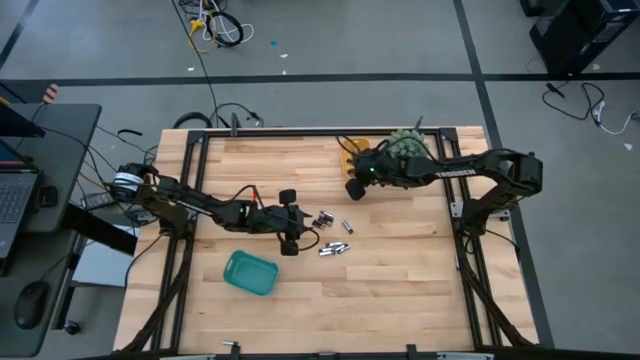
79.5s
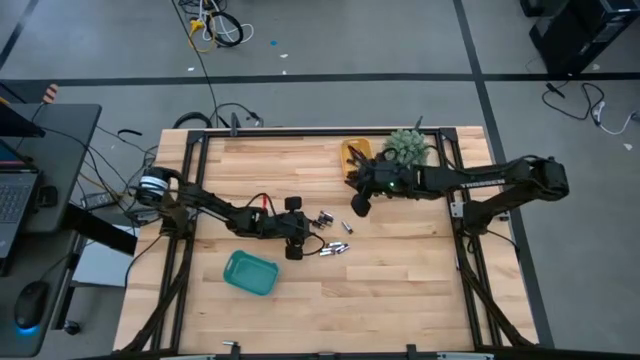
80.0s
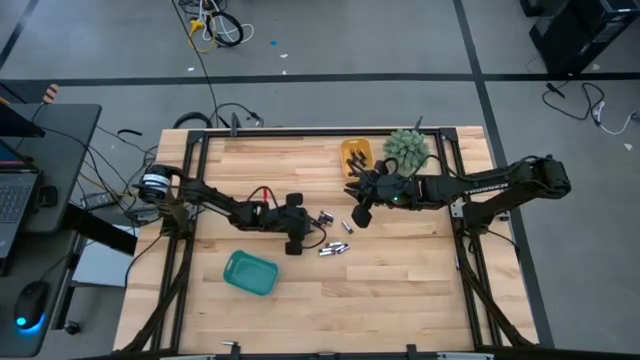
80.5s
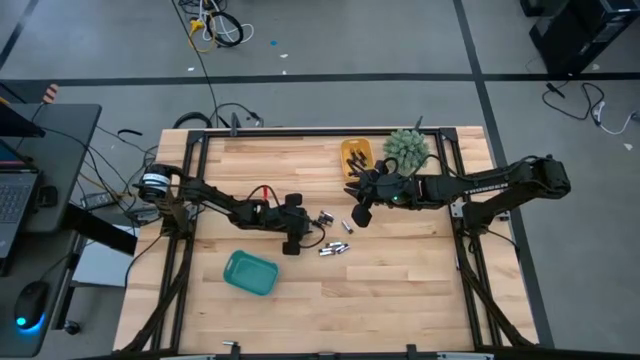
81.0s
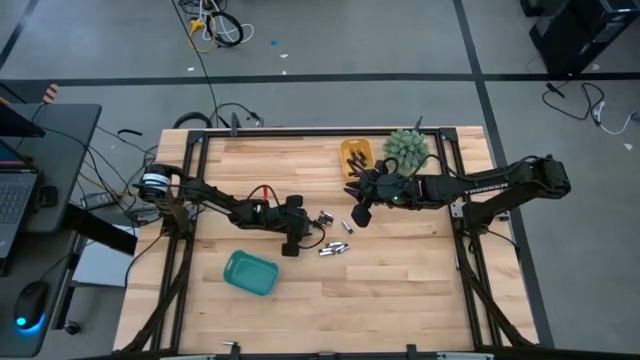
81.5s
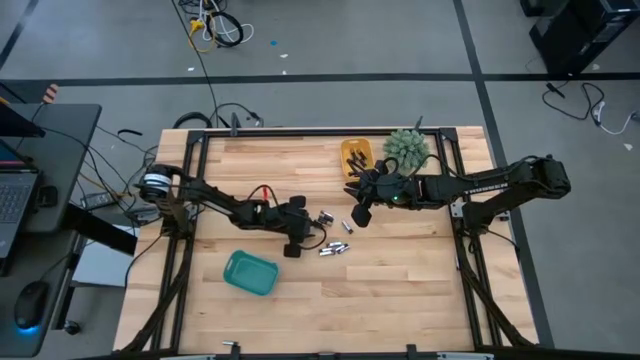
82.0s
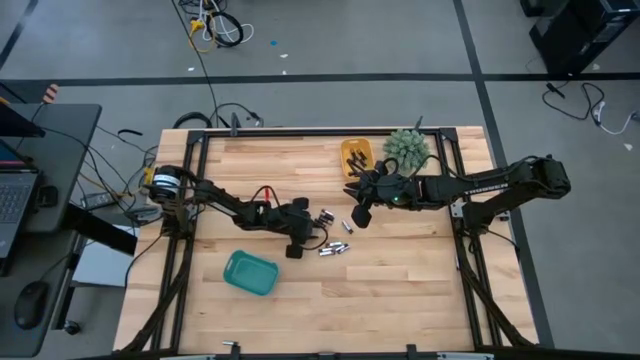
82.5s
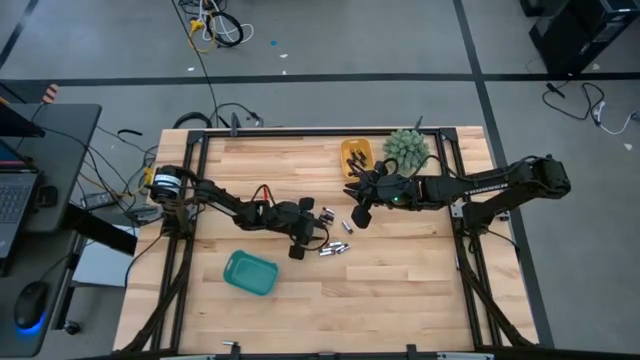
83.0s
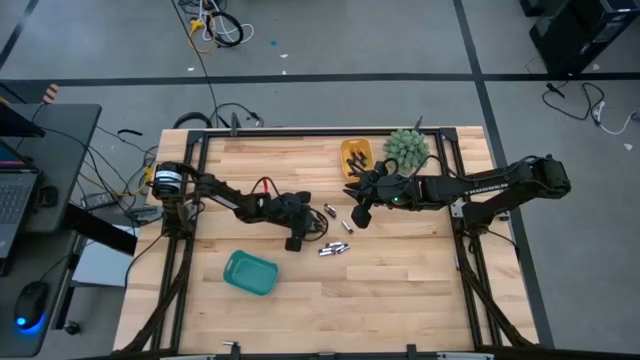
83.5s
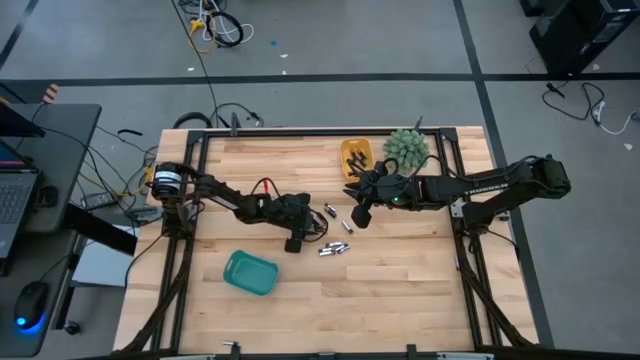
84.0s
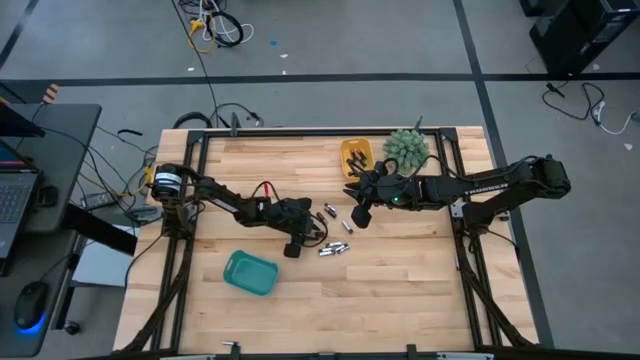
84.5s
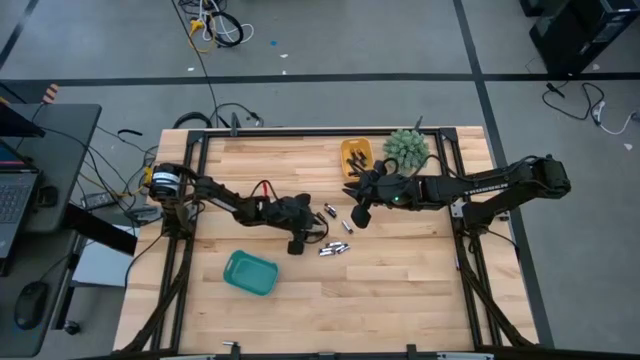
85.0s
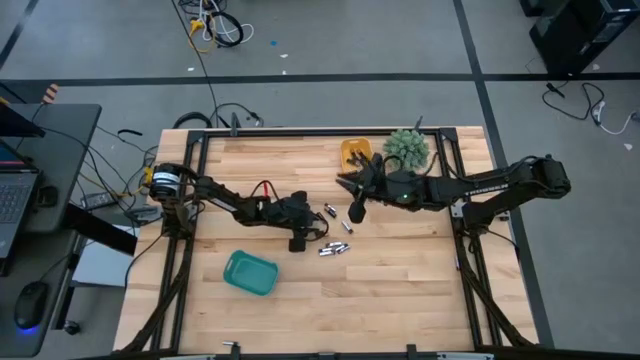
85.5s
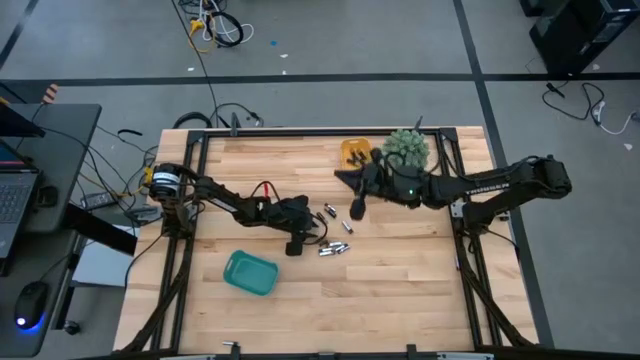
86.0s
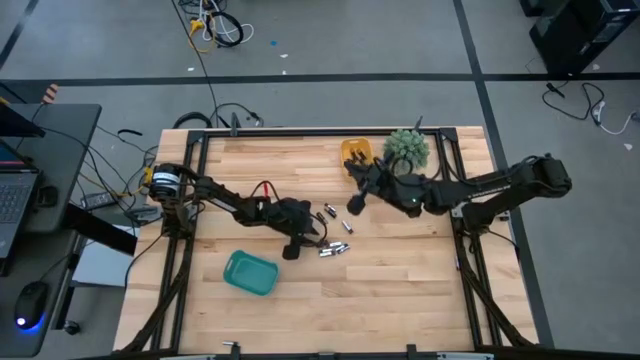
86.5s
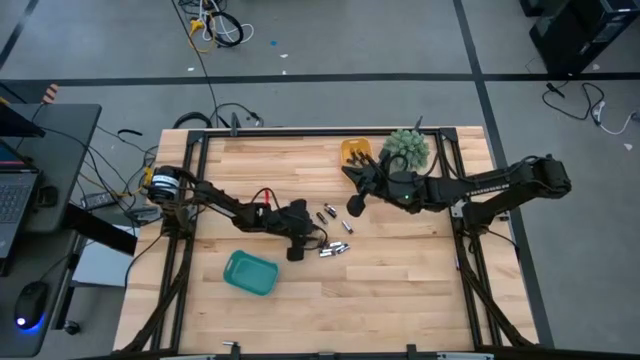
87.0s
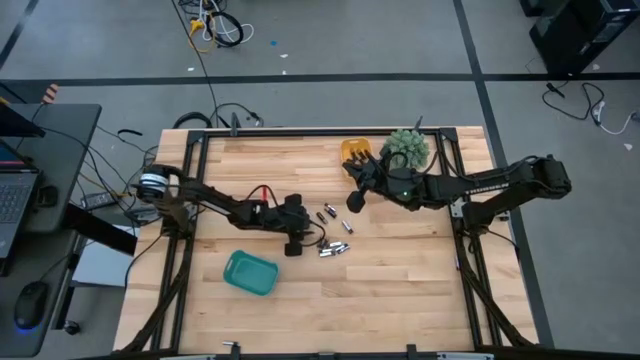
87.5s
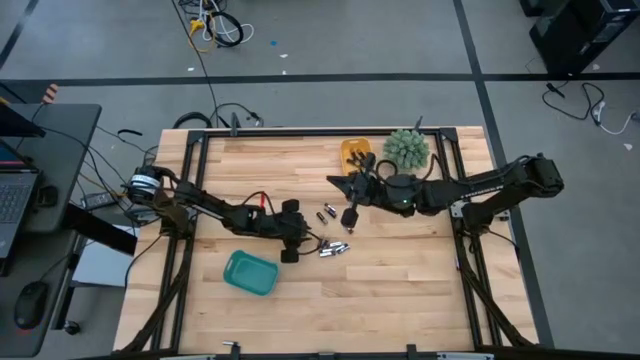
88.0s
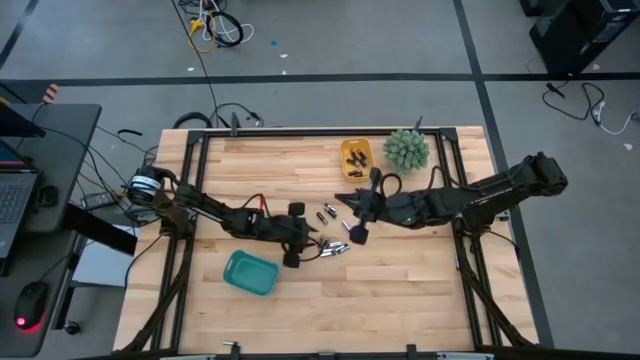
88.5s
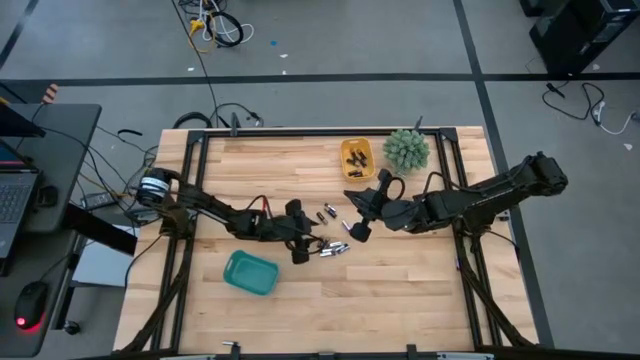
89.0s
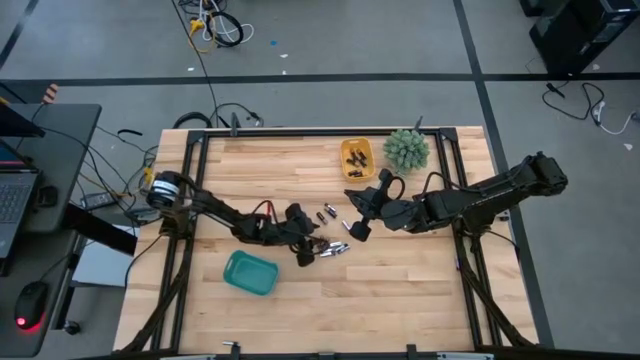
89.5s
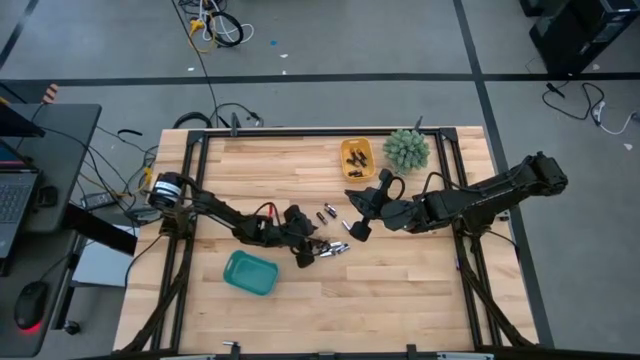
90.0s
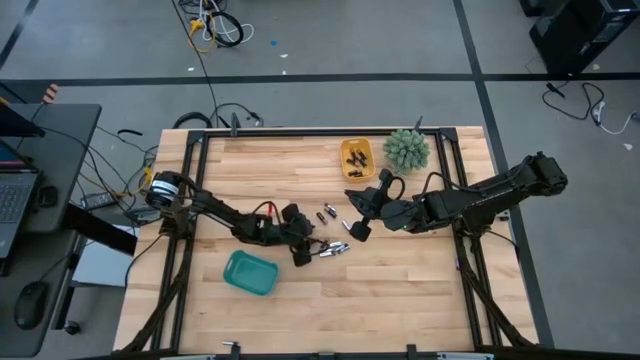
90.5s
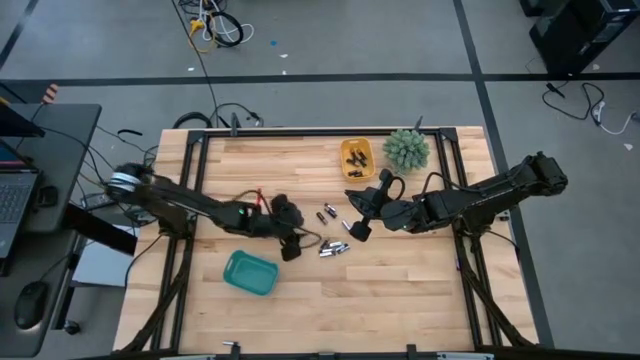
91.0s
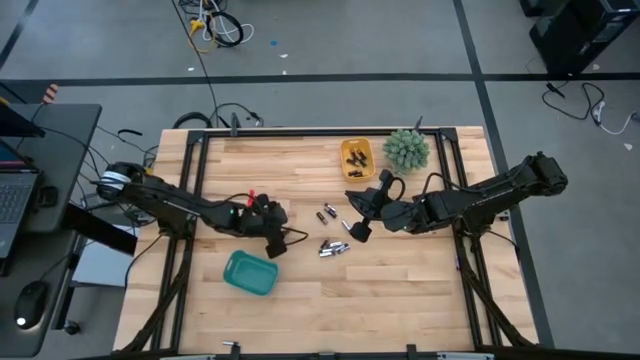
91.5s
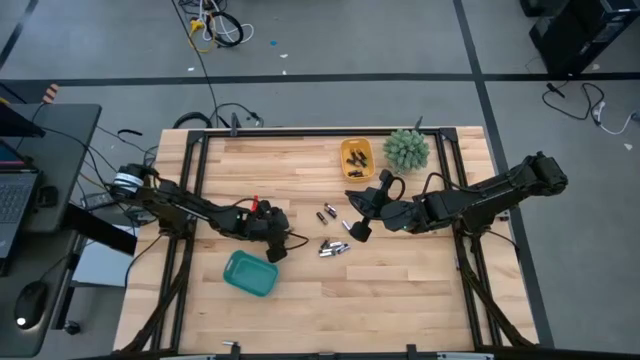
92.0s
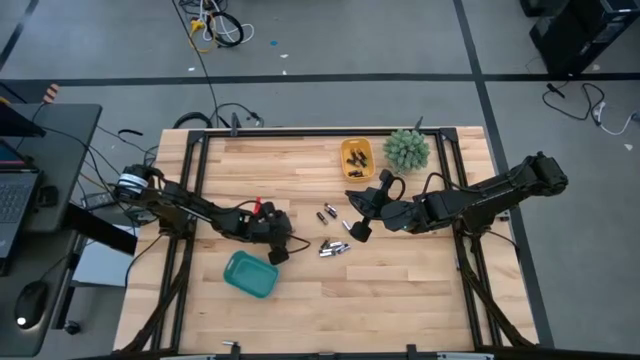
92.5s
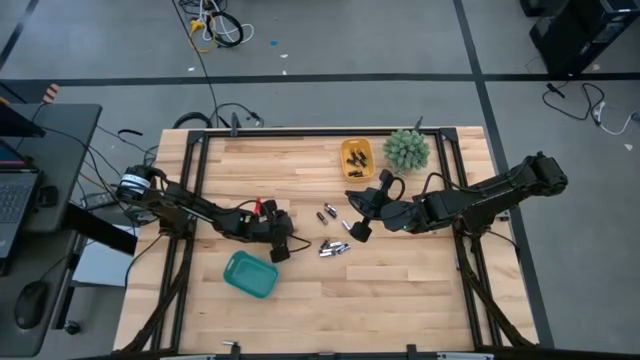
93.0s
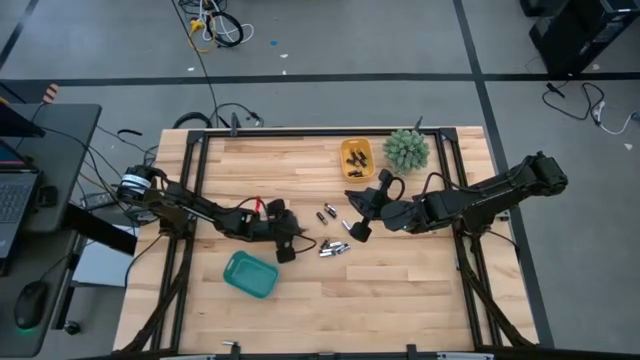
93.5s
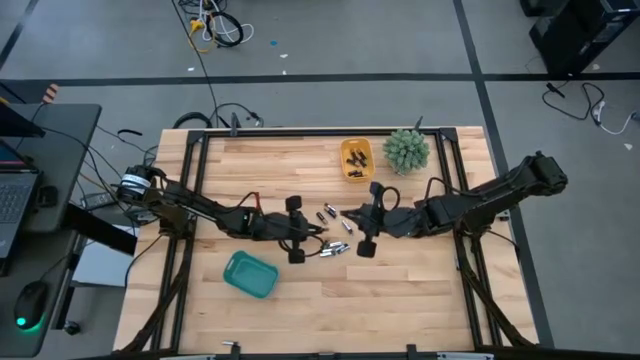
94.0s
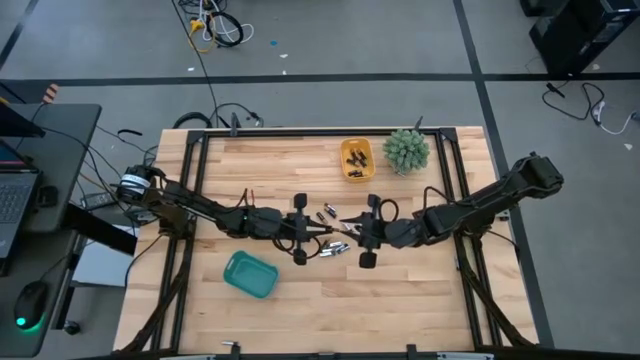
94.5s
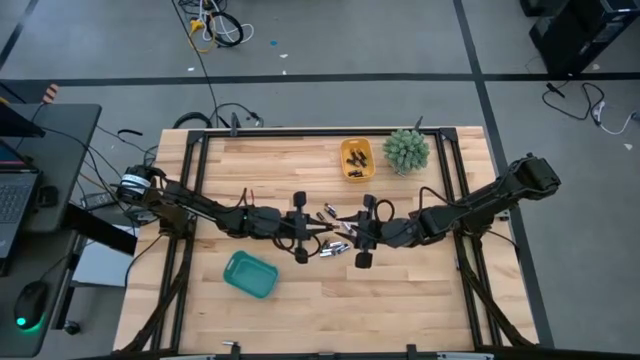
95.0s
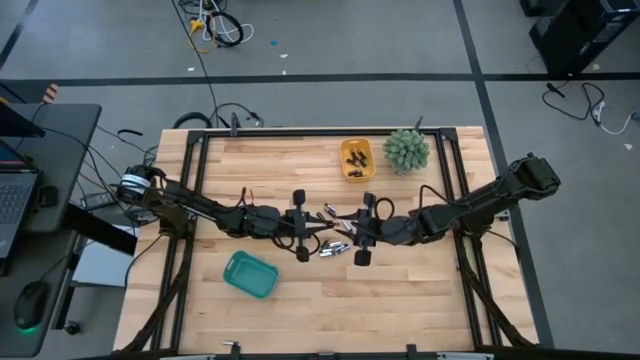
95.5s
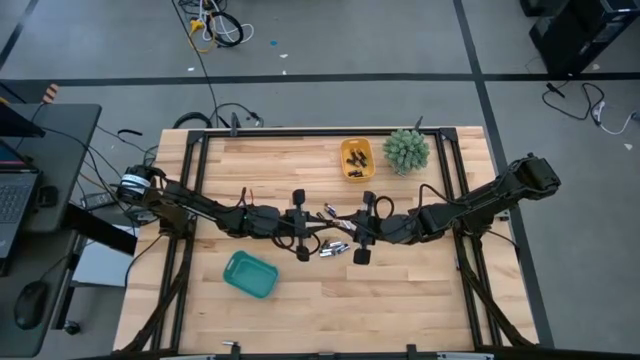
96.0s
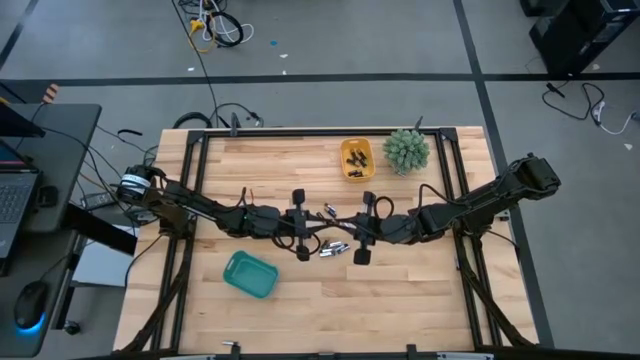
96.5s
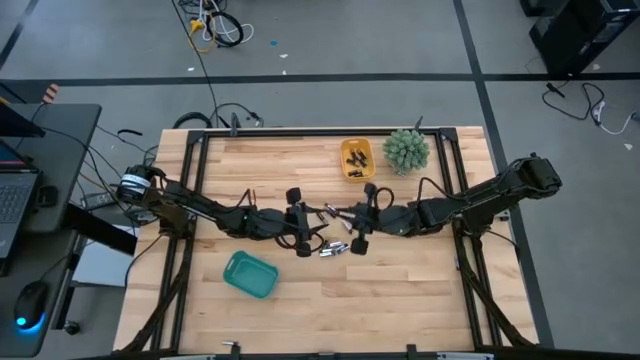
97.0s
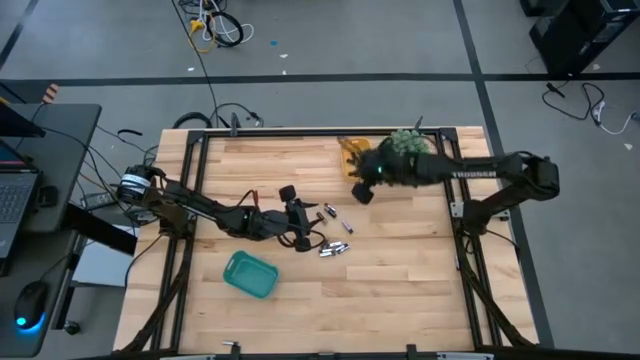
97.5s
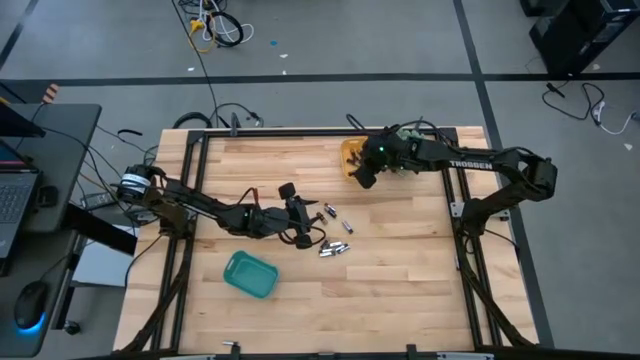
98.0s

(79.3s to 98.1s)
Task: Sort batteries
Put the black battery into the yellow bin

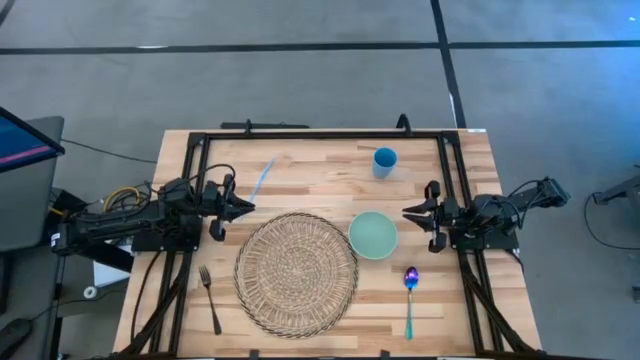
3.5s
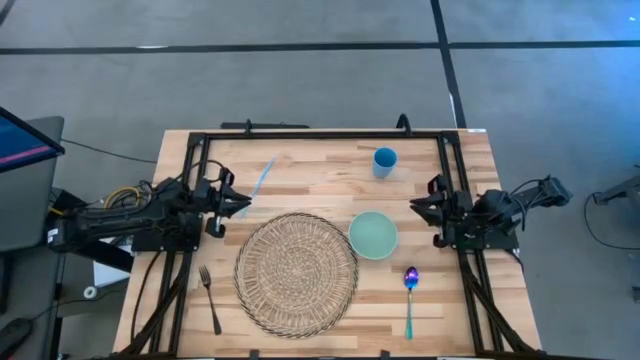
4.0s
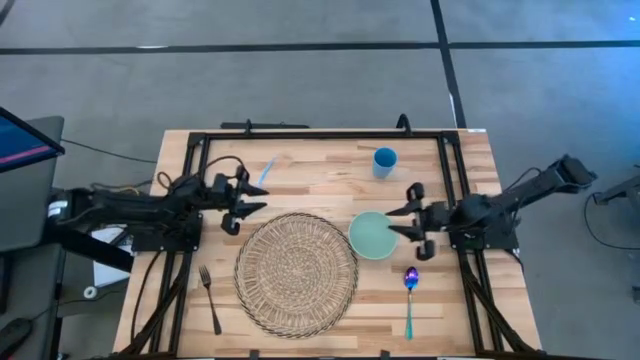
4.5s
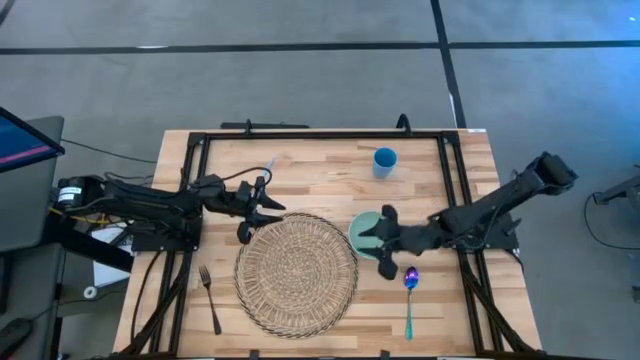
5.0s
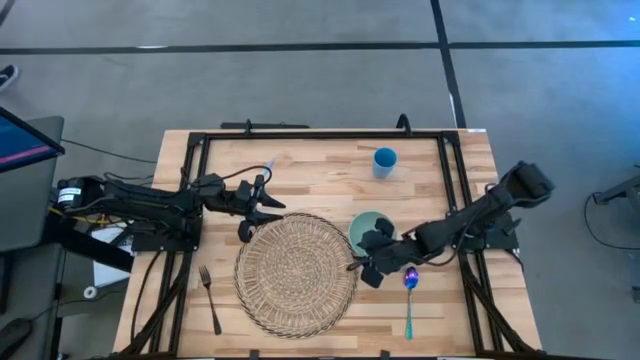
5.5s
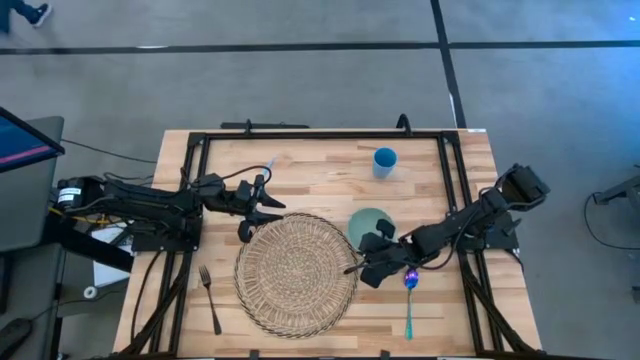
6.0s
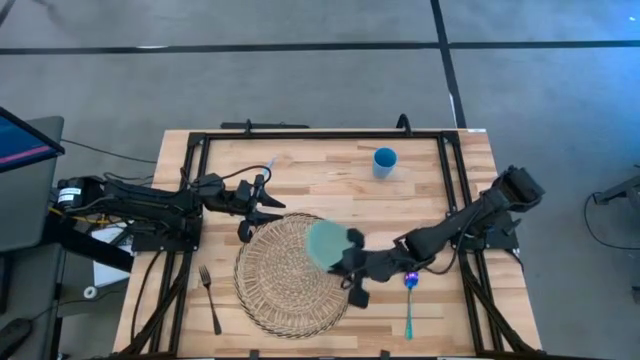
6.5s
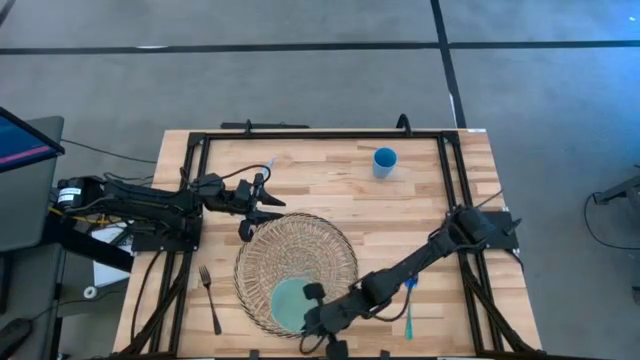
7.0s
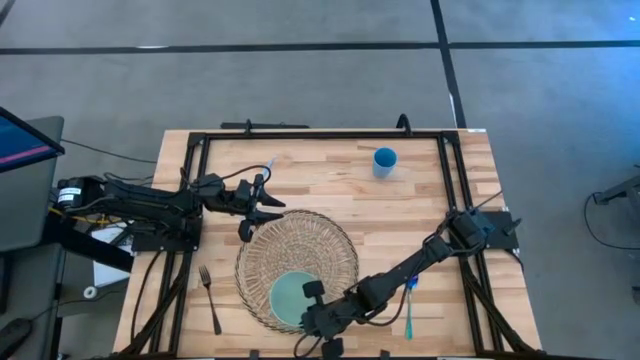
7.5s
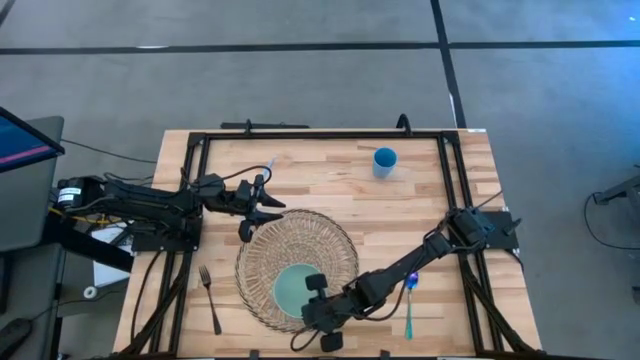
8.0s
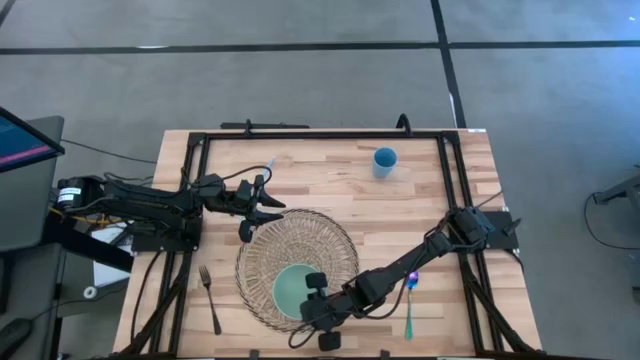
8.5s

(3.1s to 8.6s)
Task: Pick & Place Utensil
Put the light green bowl on the bottom center of the brown mat
